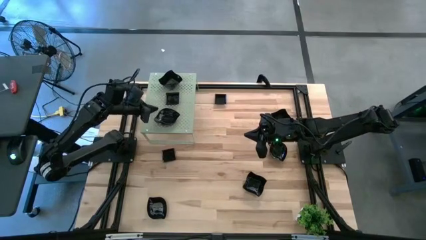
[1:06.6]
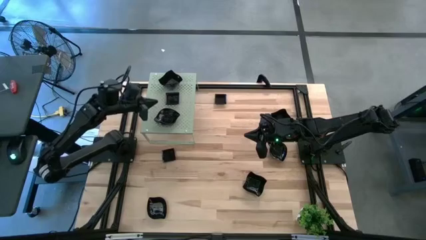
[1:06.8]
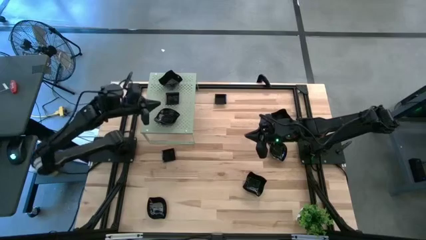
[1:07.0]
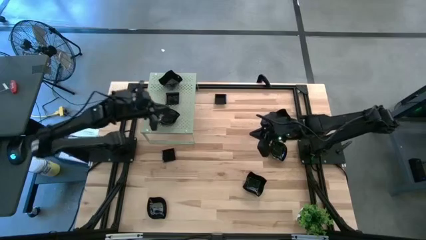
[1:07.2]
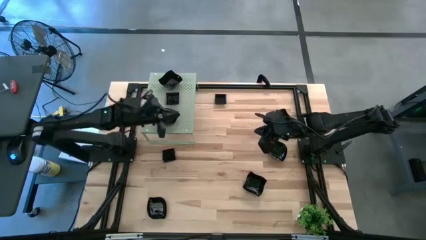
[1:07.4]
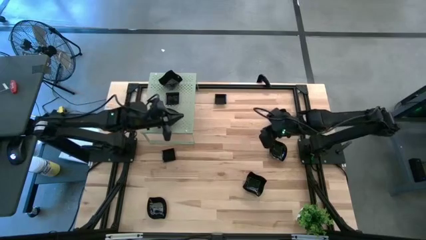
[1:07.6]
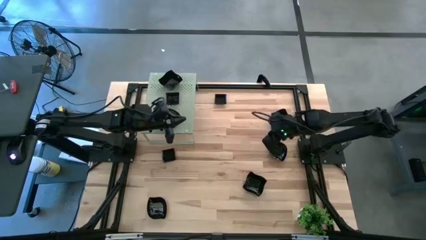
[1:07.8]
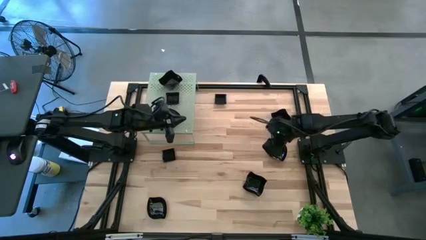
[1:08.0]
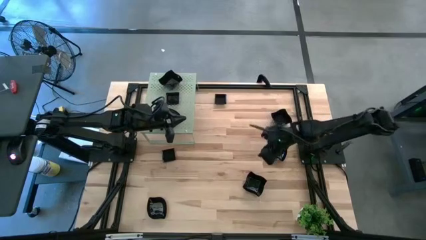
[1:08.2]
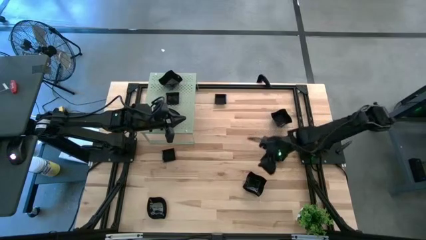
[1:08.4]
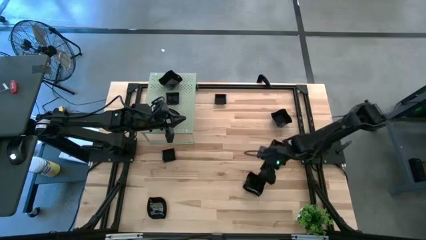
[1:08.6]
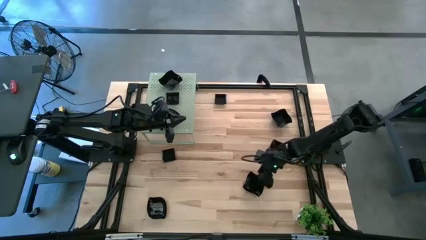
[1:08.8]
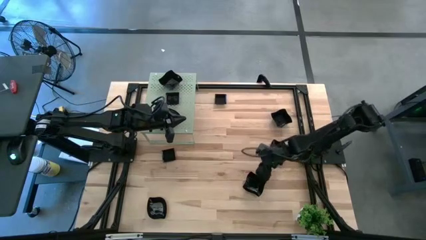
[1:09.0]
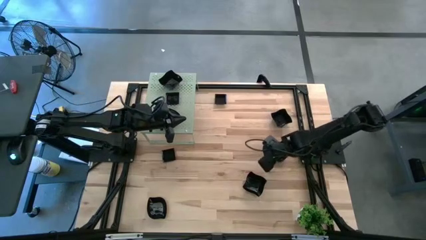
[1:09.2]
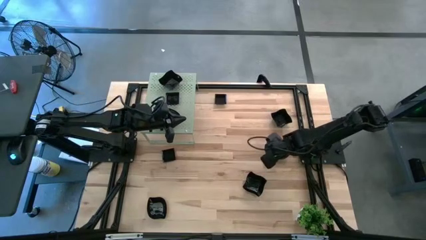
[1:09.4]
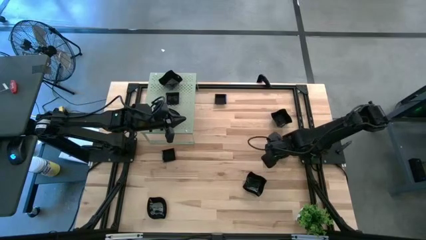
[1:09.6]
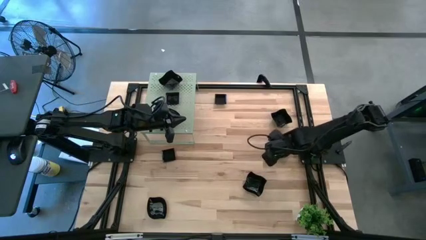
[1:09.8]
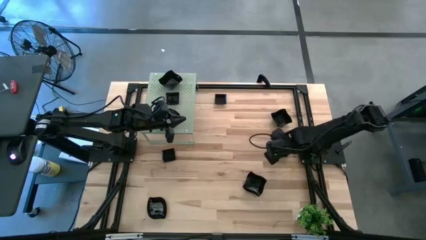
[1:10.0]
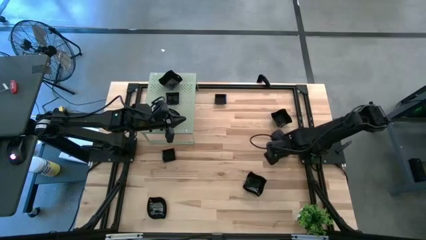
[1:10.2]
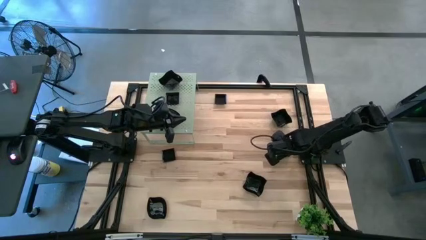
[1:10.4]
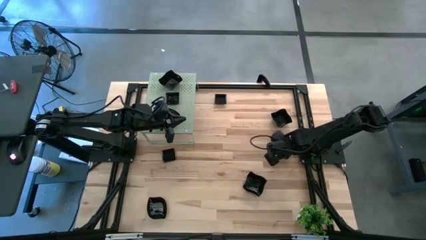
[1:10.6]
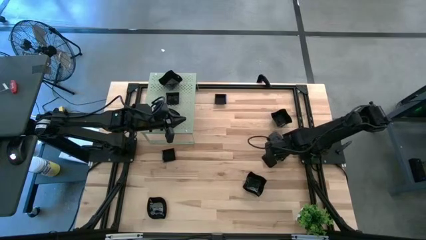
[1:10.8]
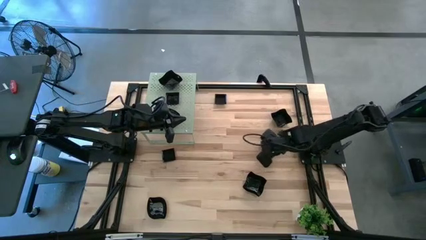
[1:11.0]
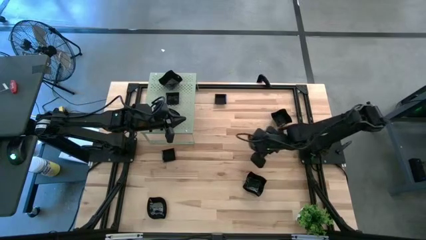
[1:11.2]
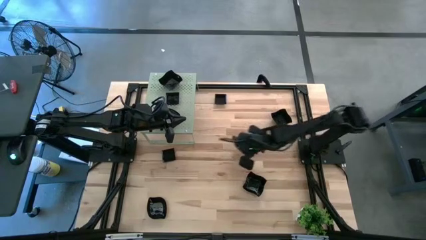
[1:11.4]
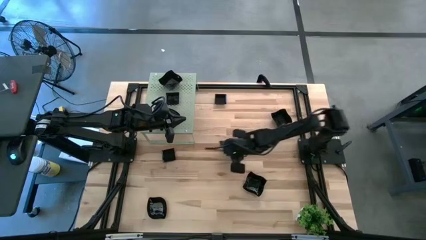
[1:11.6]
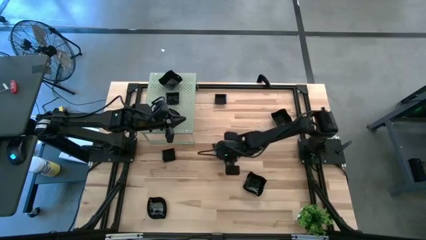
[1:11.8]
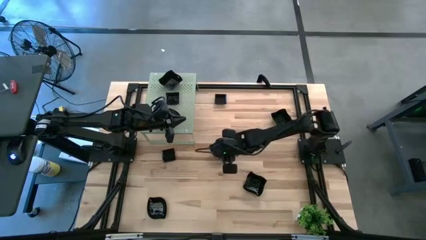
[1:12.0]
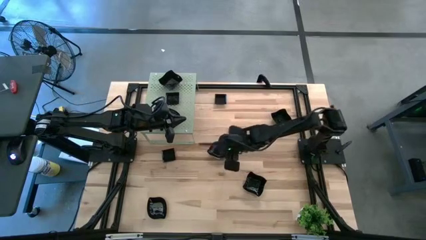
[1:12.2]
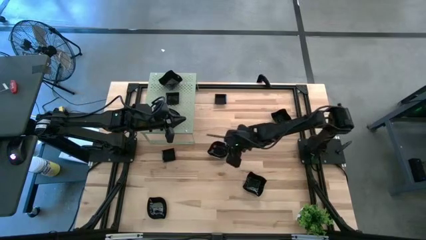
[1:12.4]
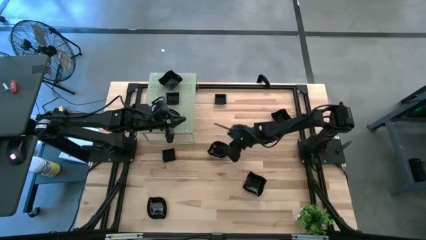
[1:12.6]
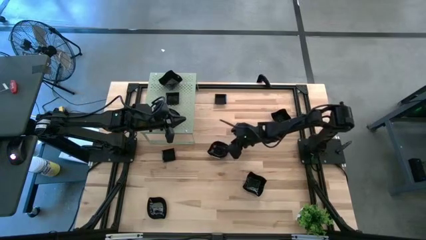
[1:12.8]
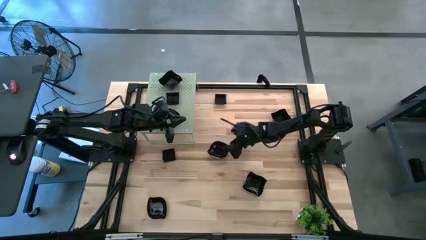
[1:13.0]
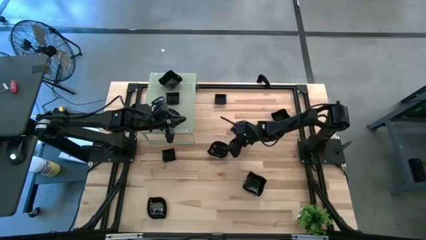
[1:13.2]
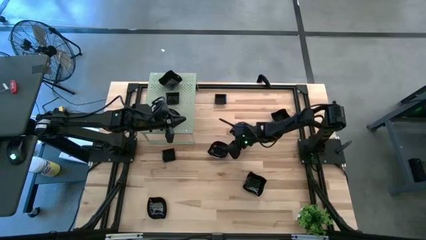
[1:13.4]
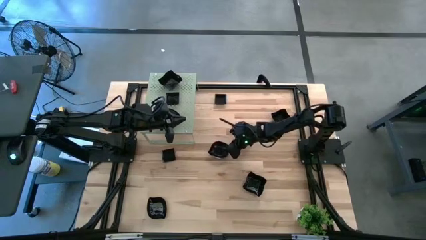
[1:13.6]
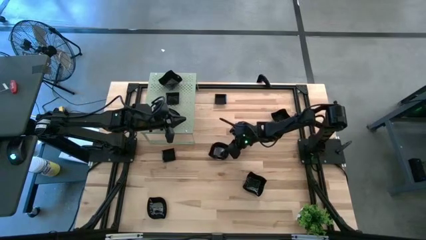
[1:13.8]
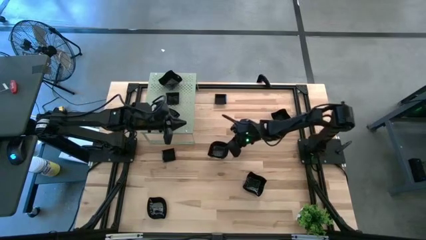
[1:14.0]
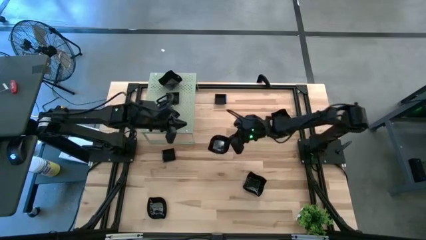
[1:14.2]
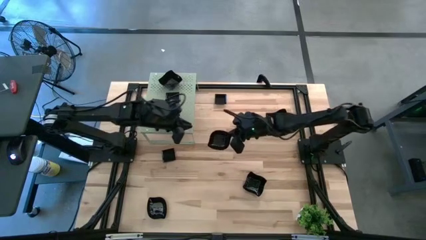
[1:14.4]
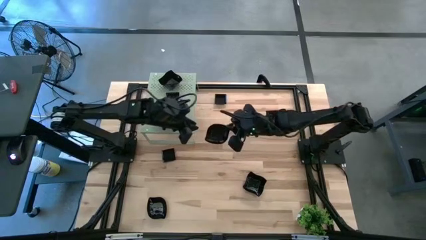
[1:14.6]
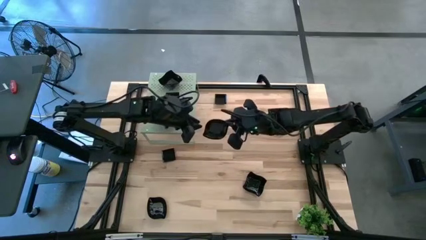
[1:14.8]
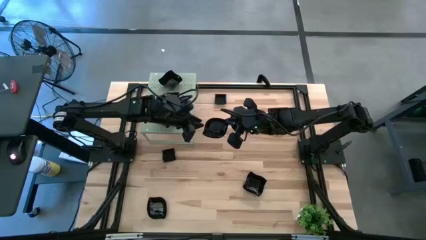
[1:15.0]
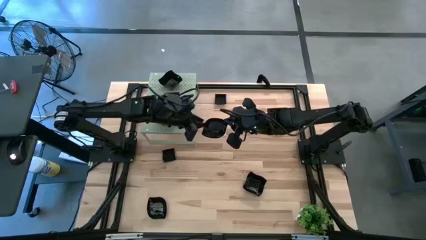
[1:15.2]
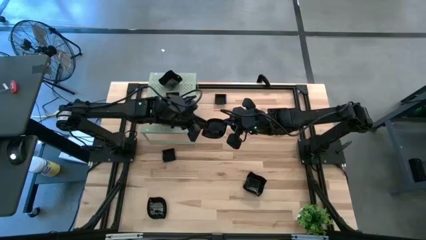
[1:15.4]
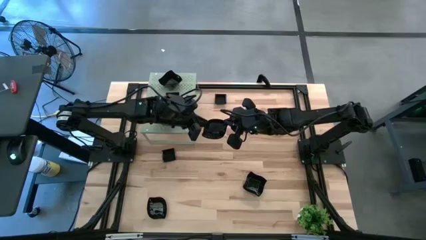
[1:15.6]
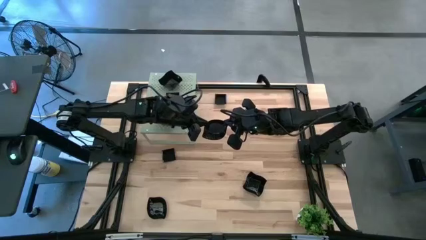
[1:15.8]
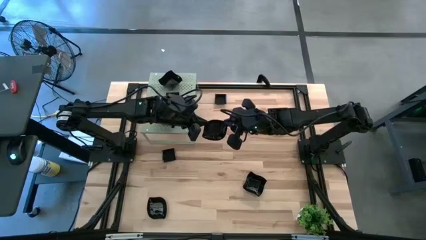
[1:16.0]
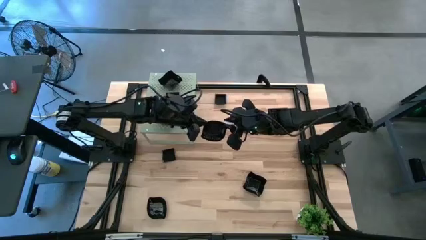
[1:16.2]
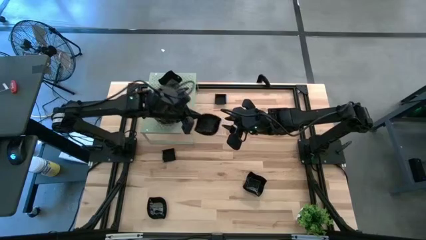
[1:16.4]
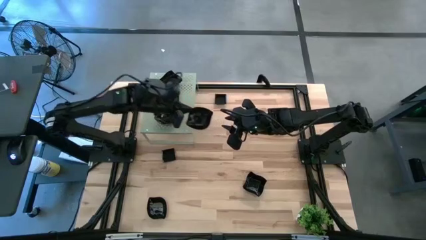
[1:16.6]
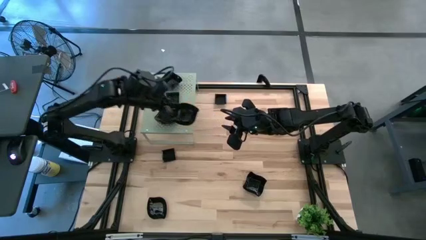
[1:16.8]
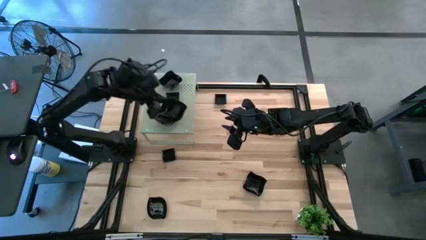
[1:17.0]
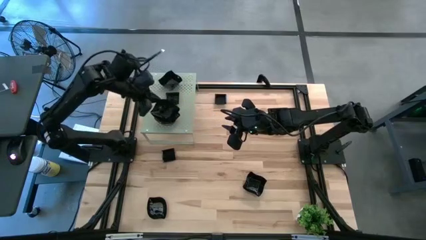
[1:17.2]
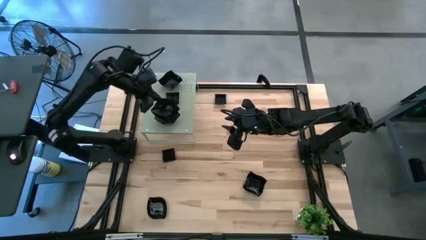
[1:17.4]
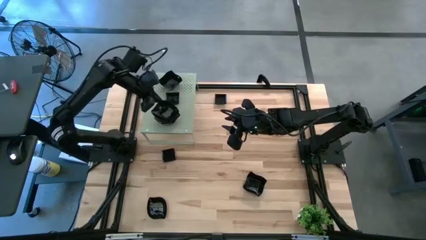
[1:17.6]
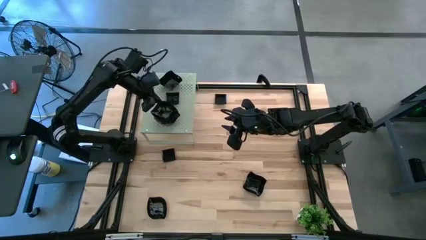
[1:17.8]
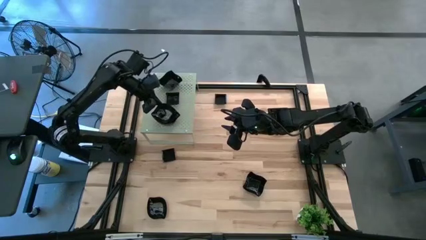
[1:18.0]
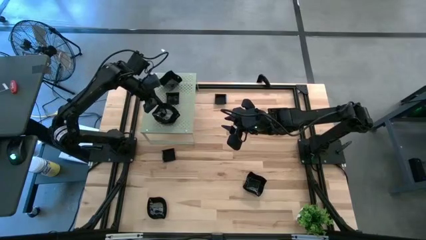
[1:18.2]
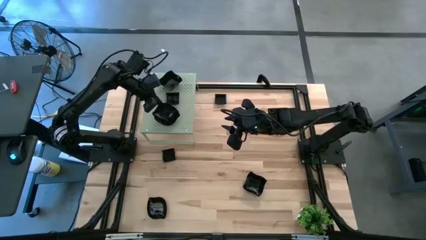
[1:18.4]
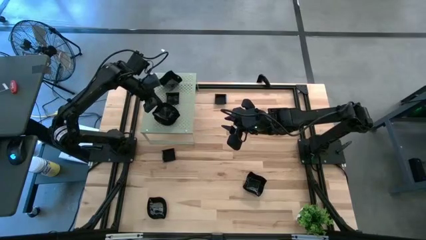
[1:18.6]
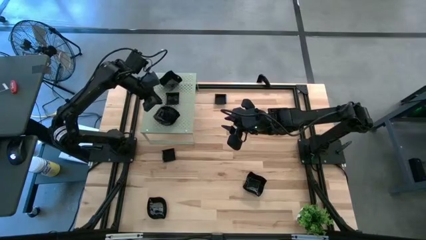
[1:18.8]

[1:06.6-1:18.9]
Task: Pick & Place Mini shaped plates
Stack the leaf-shaped plate on the other leaf-shaped plate on the shelf

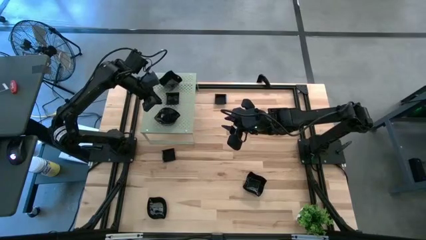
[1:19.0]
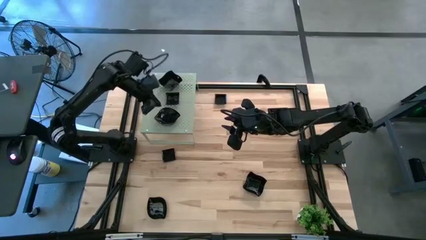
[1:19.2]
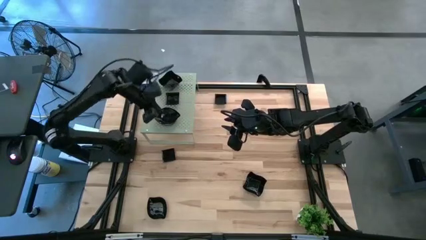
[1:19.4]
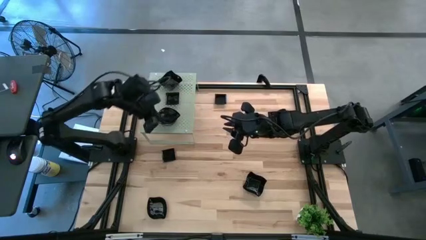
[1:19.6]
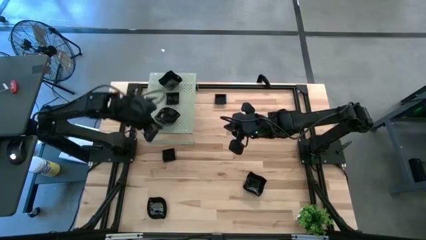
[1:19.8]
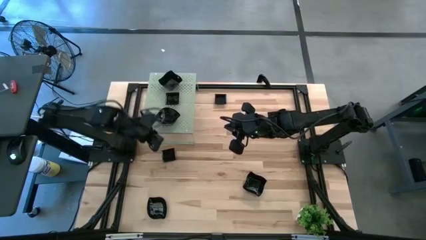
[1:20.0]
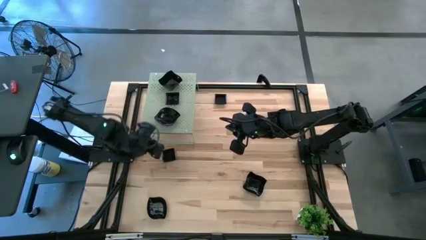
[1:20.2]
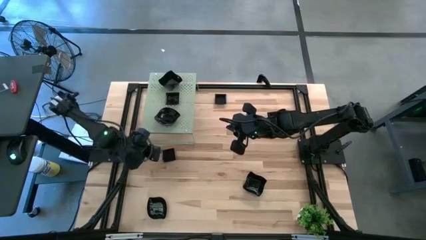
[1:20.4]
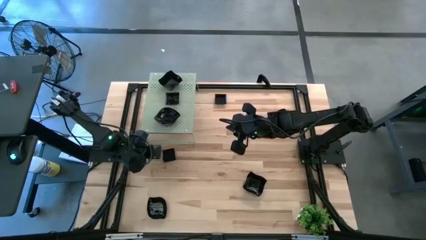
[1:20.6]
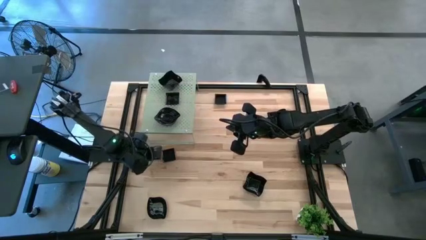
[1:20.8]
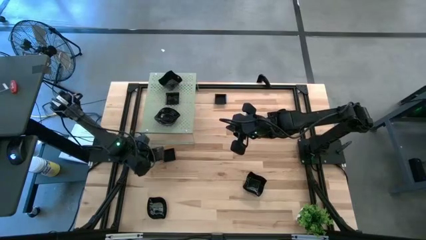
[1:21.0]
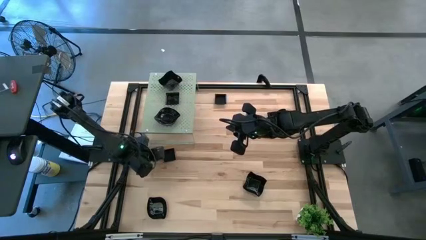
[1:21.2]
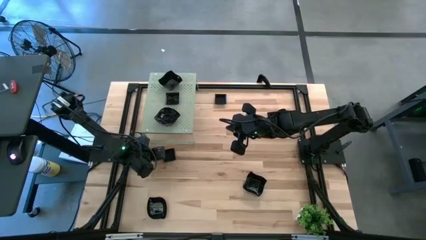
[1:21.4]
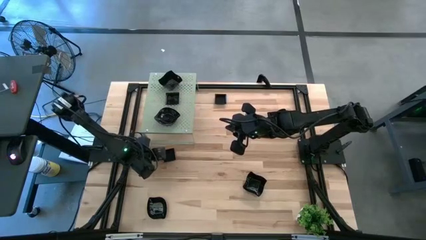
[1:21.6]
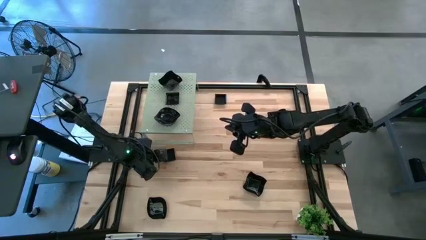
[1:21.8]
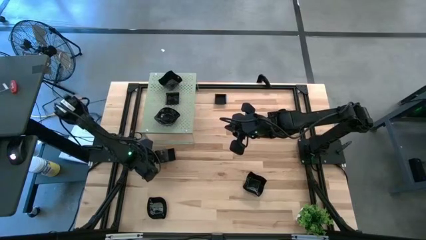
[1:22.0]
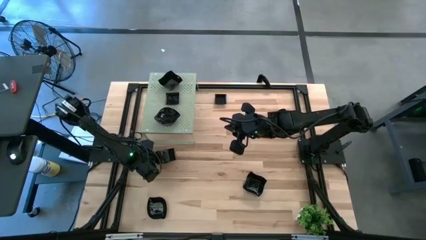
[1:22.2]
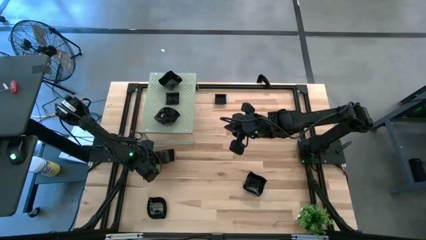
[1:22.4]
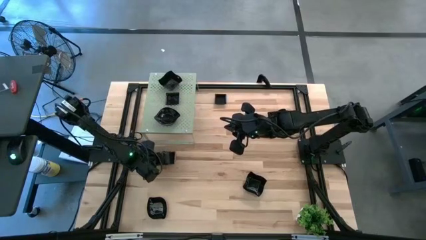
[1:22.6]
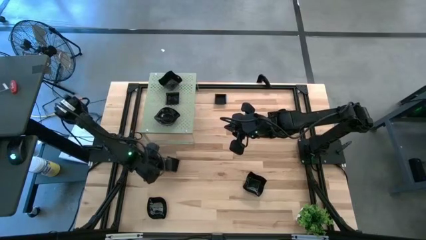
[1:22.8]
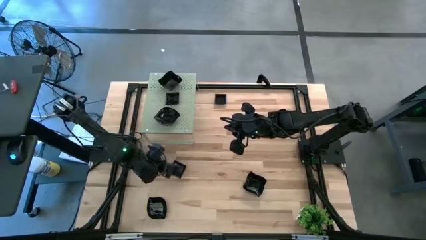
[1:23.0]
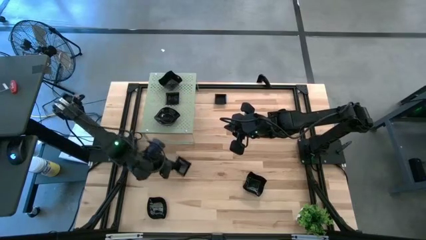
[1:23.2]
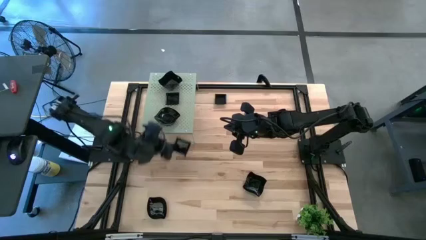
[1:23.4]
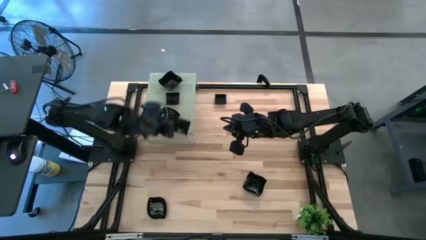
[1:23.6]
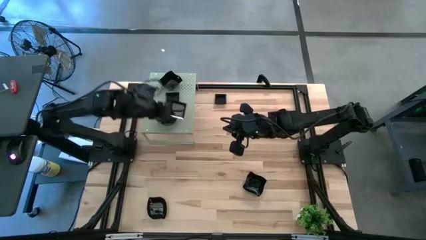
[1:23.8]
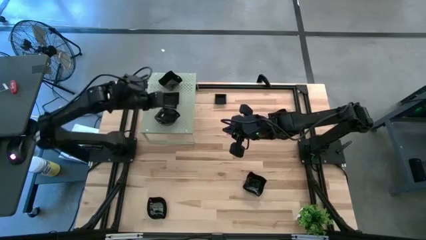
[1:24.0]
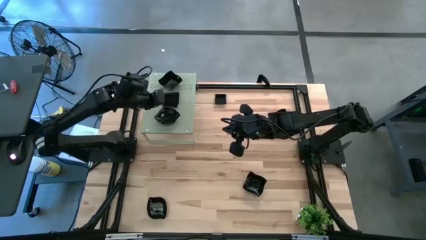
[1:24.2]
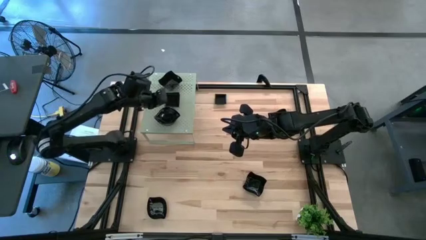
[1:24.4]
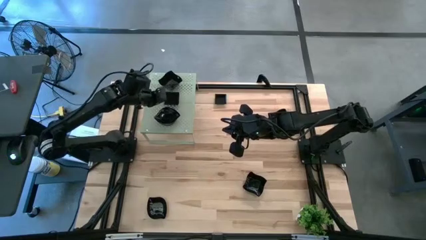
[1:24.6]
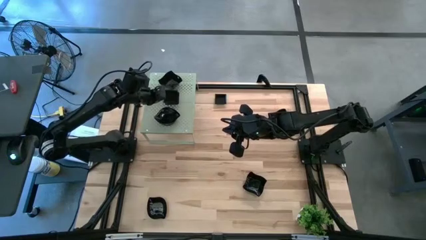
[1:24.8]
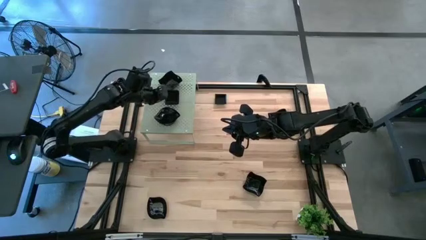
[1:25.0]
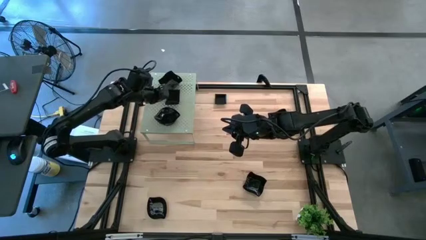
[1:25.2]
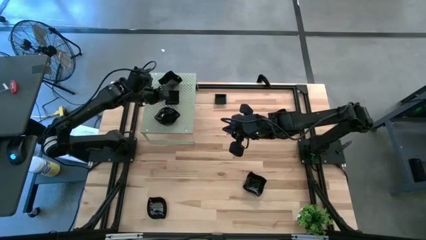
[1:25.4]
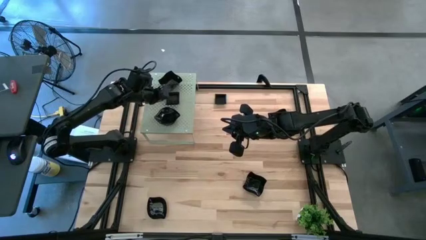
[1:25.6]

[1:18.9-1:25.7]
Stack the square plate on the other square plate on the shelf
